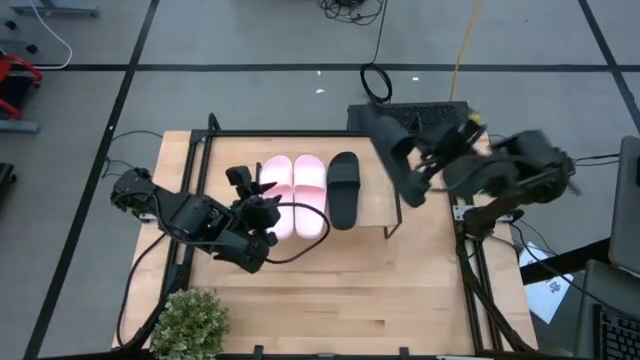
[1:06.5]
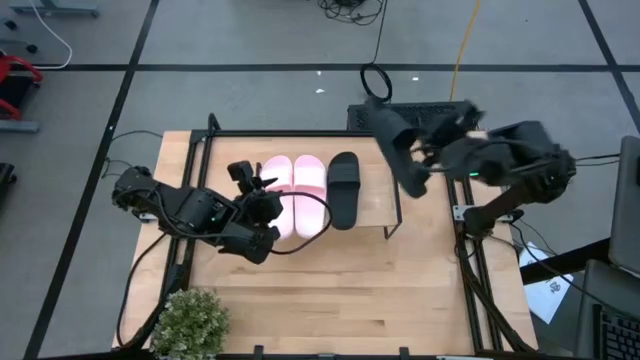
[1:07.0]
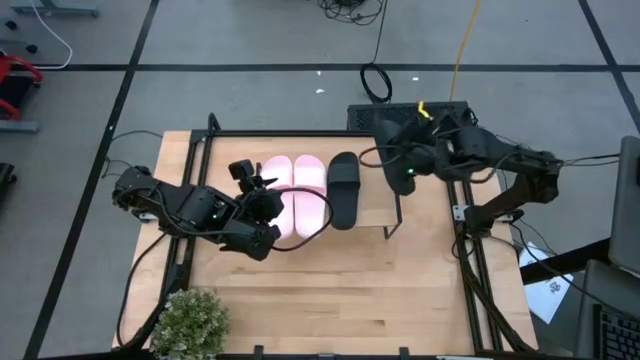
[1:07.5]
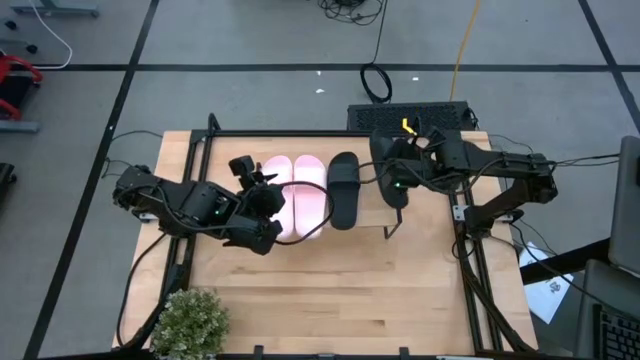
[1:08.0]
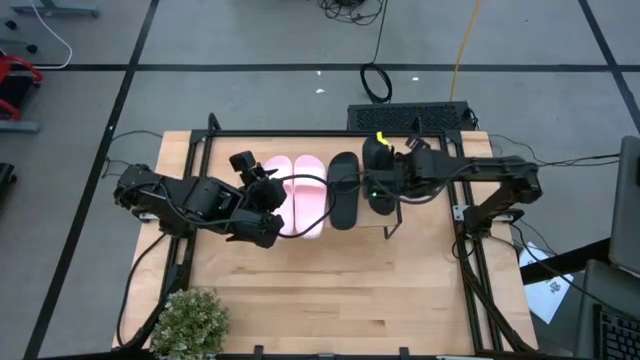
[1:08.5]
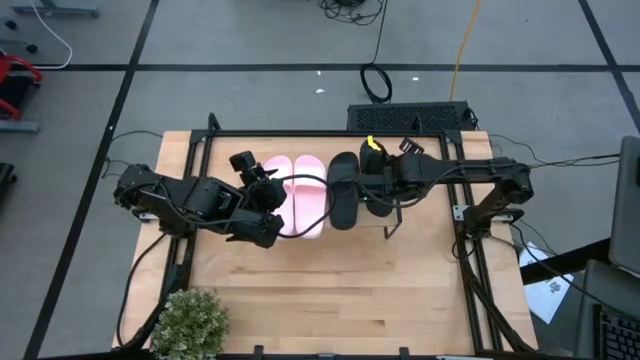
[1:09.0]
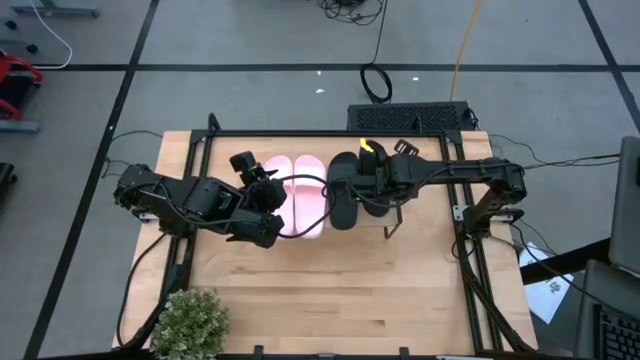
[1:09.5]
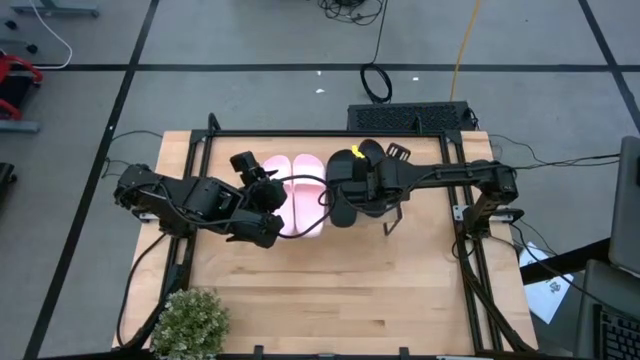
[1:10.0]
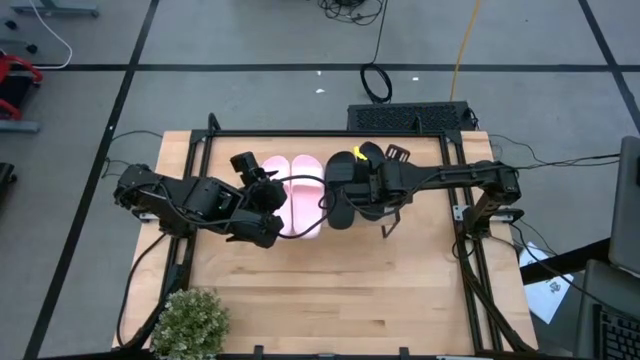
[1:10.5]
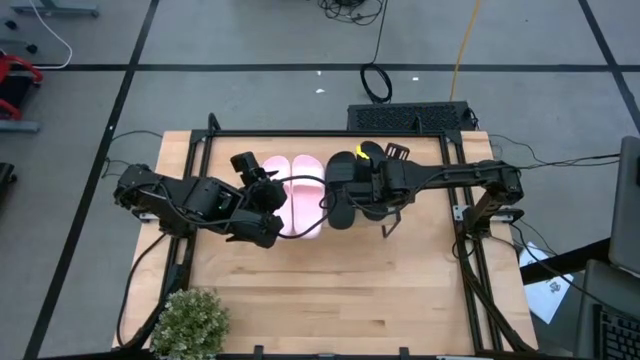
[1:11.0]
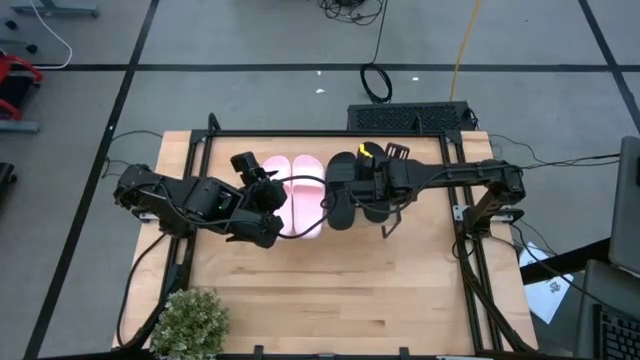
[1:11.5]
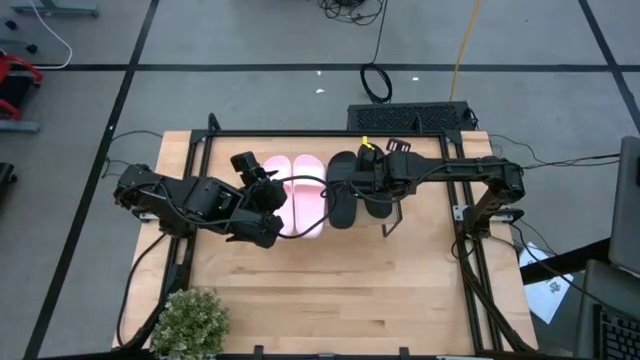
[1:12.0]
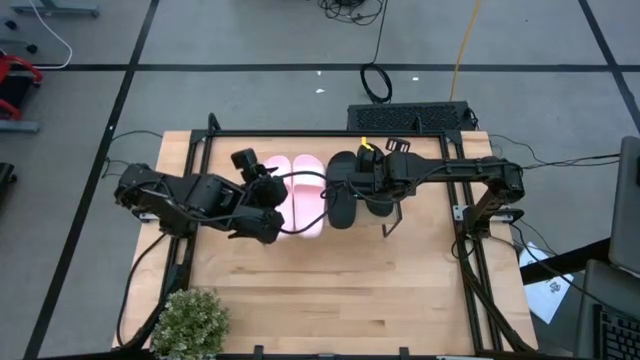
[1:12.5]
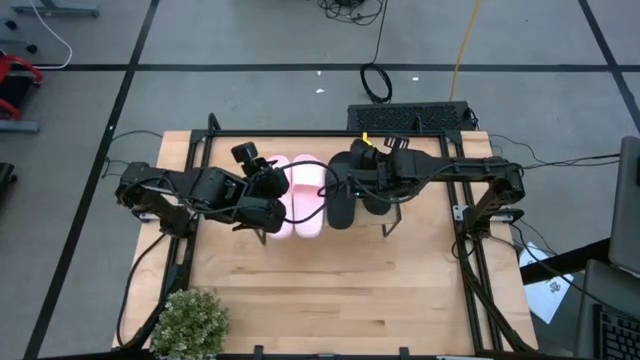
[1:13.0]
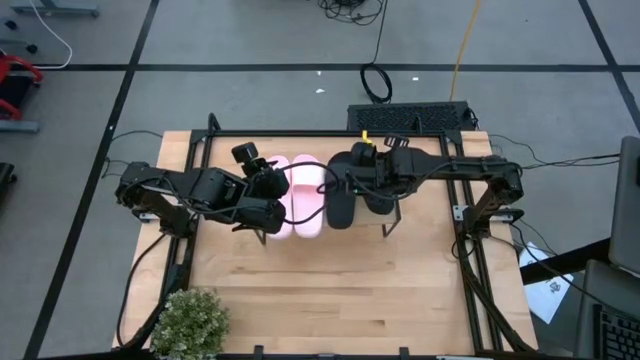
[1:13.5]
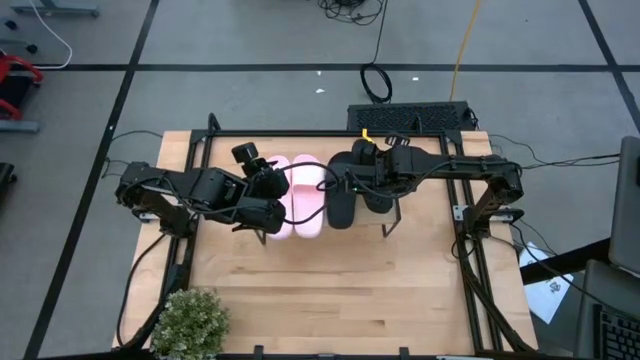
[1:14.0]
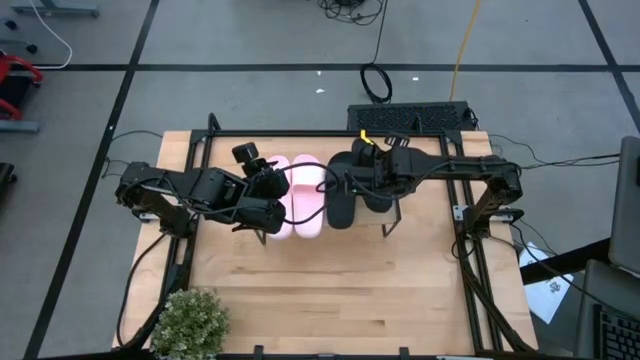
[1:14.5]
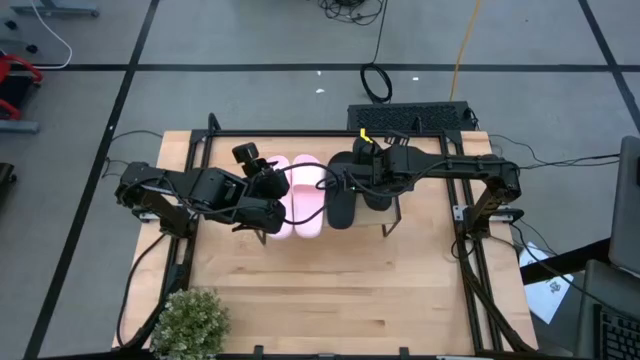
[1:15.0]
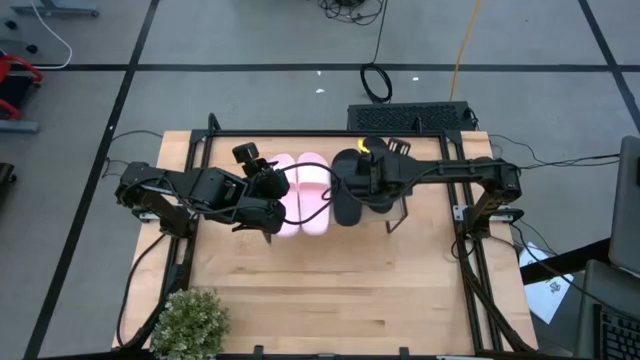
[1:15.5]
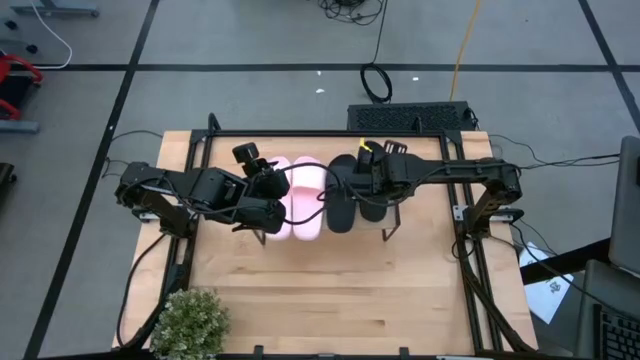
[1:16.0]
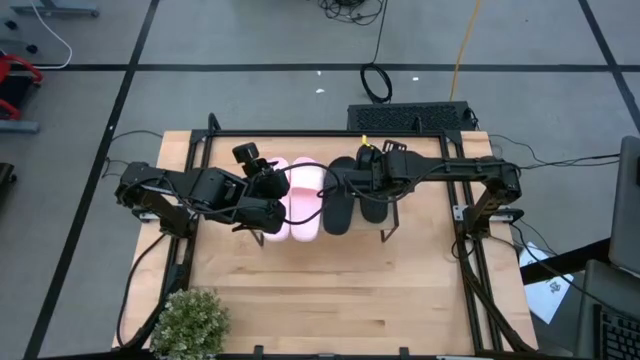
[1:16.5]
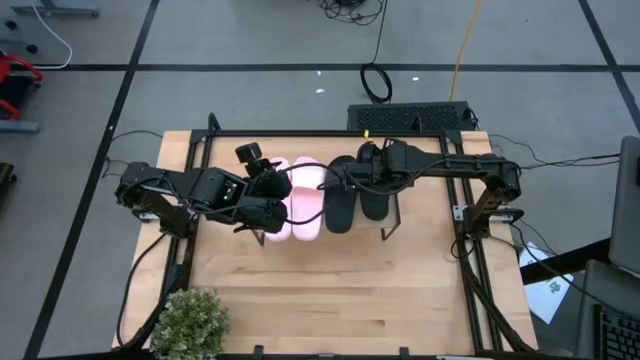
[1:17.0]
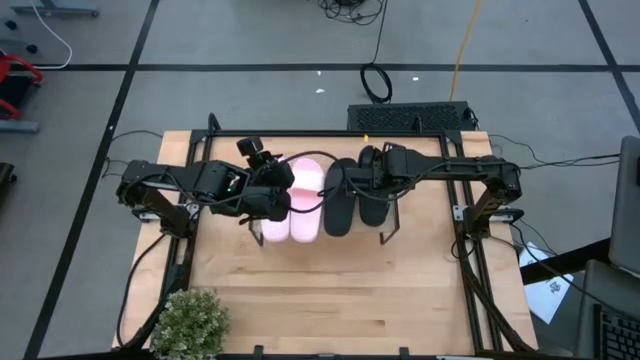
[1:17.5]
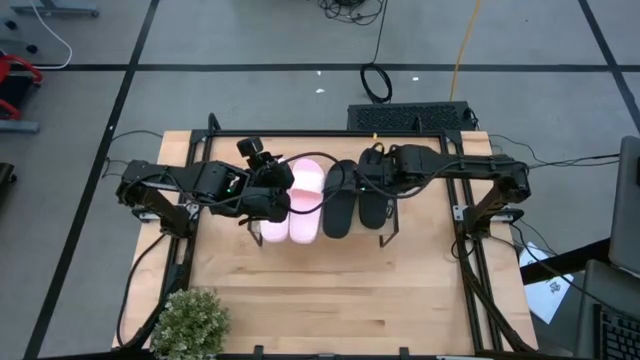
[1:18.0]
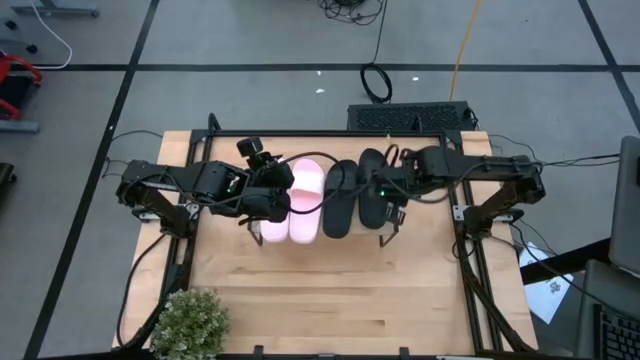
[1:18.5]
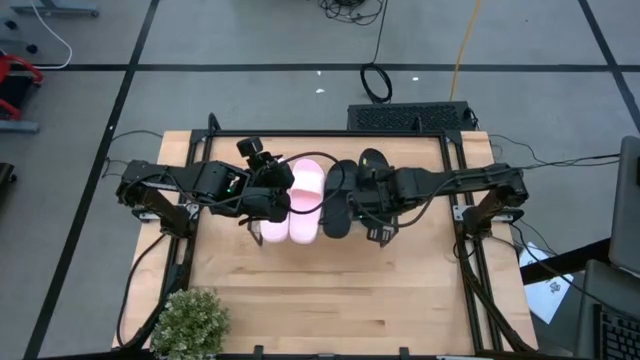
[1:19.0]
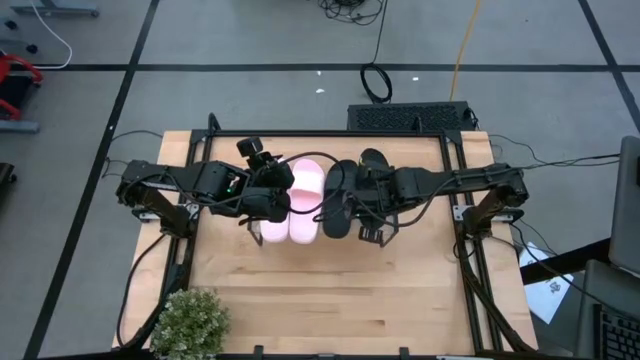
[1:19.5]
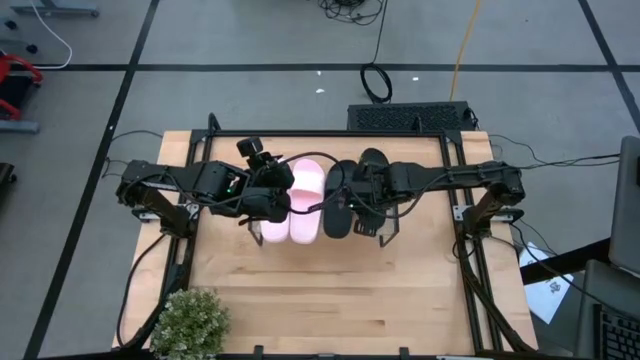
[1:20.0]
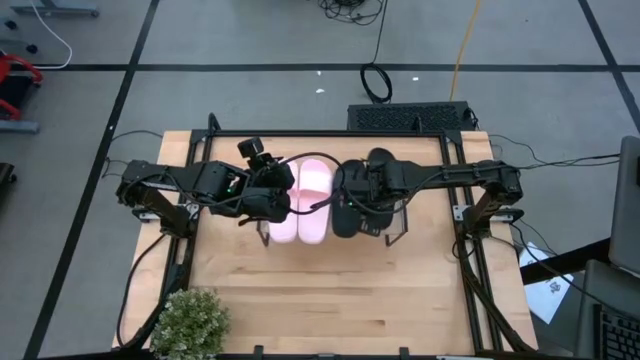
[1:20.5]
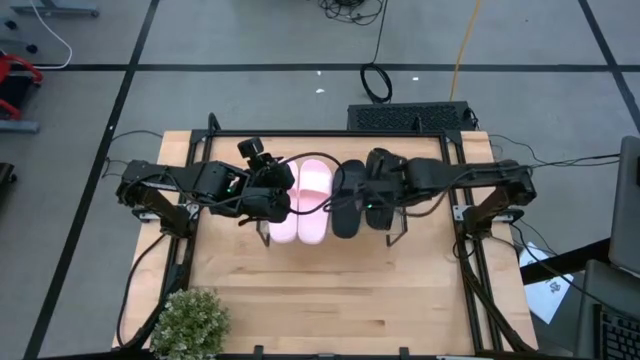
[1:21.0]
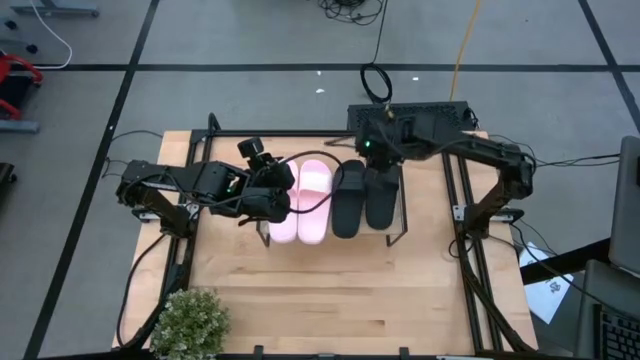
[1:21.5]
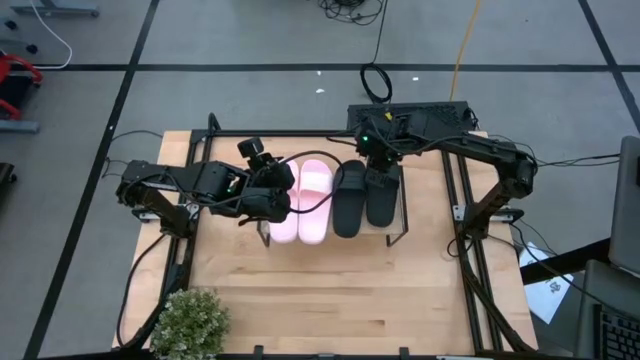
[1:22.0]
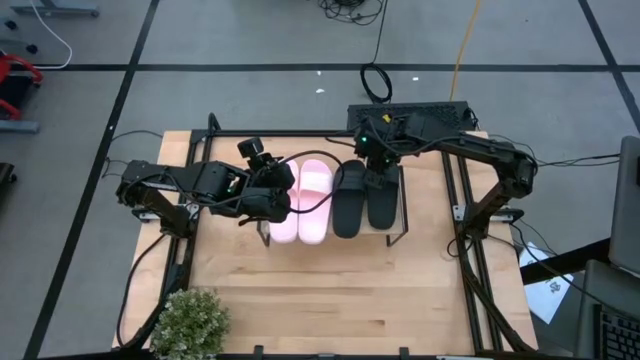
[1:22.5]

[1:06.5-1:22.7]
Task: Pick and place slides into the shelf
Put the black slipper on the shelf

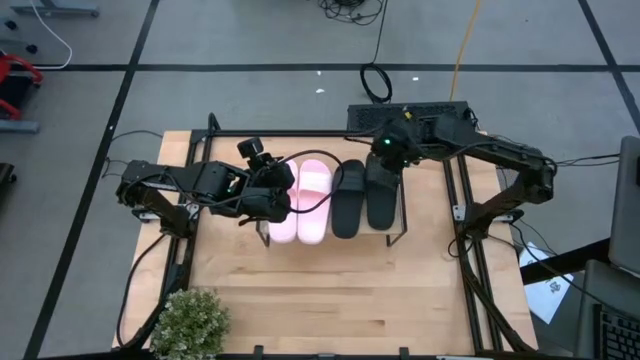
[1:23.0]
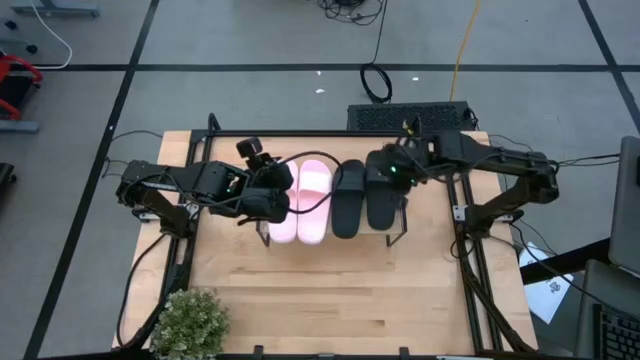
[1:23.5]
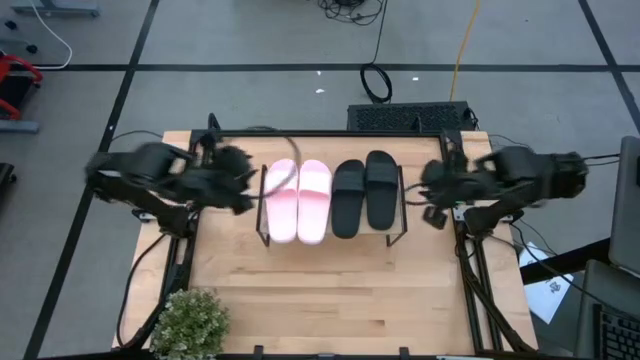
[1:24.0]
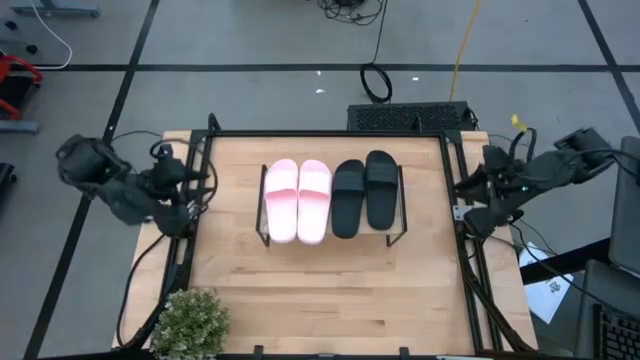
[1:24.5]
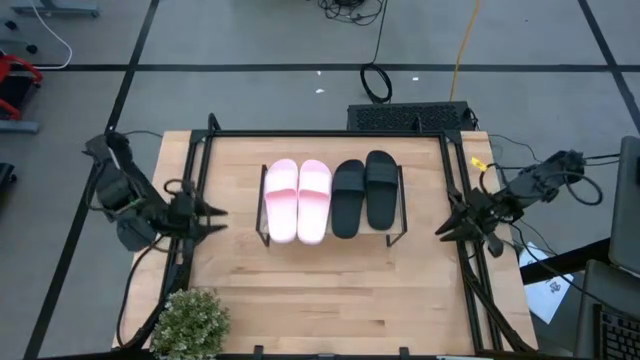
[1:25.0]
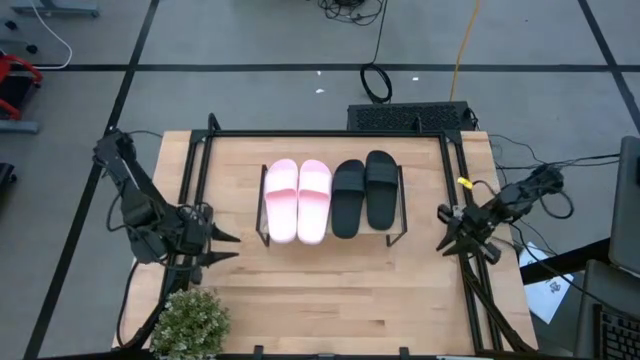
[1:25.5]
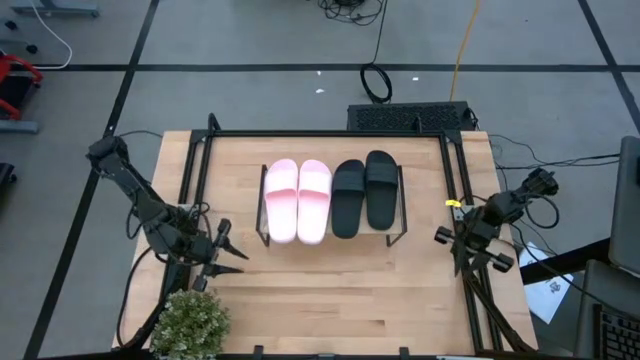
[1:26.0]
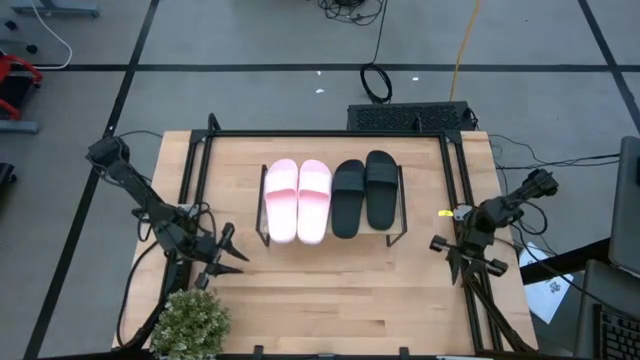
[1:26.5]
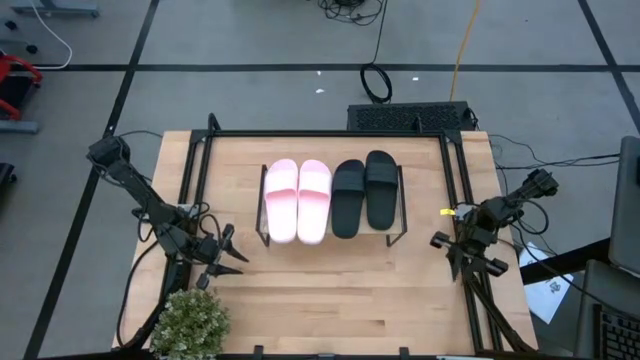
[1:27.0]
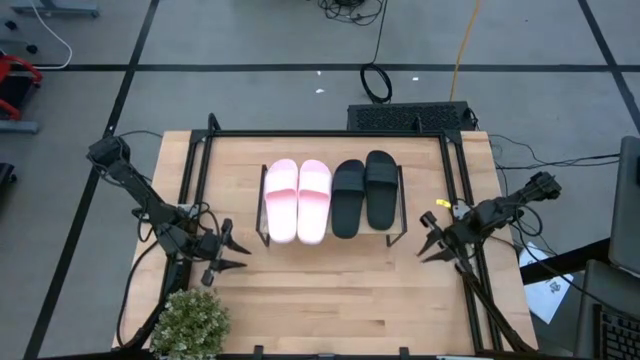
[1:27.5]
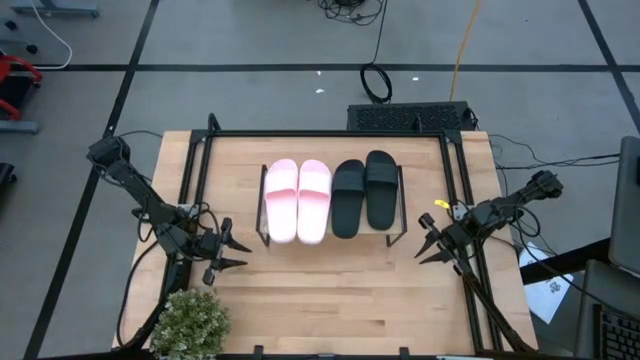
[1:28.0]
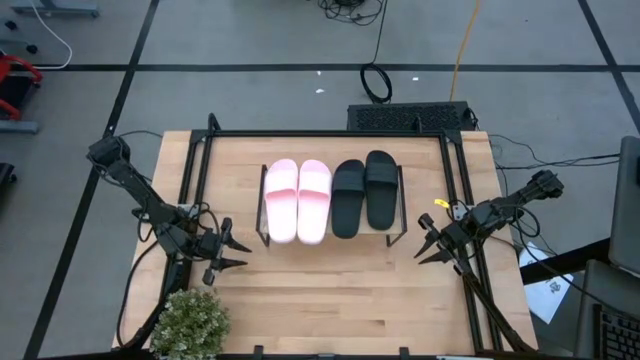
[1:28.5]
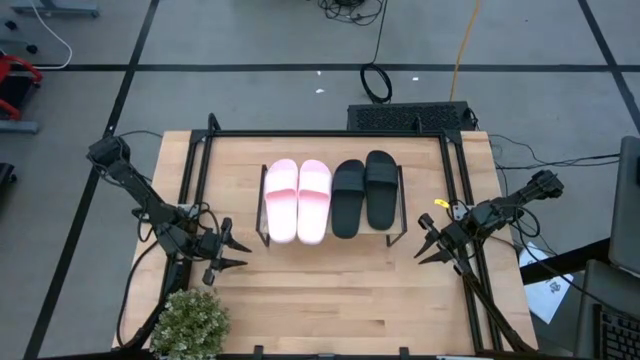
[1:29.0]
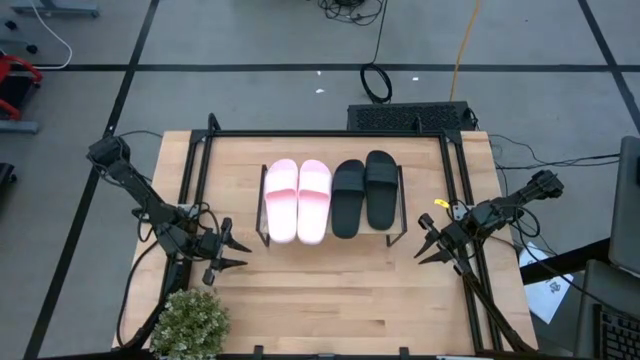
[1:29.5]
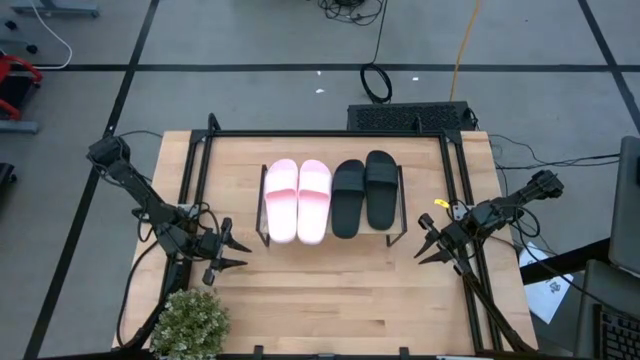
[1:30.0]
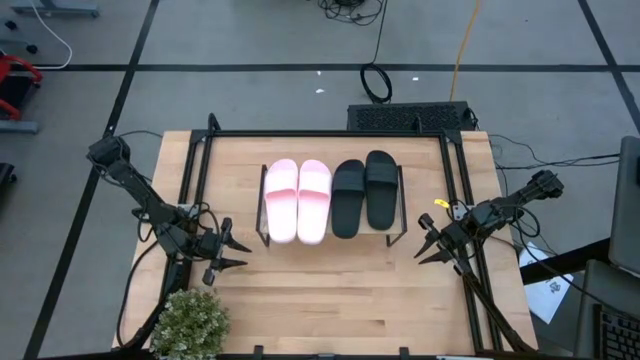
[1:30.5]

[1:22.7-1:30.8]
Return to Home Position
